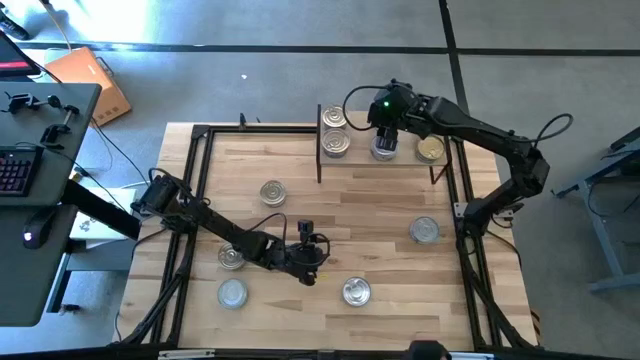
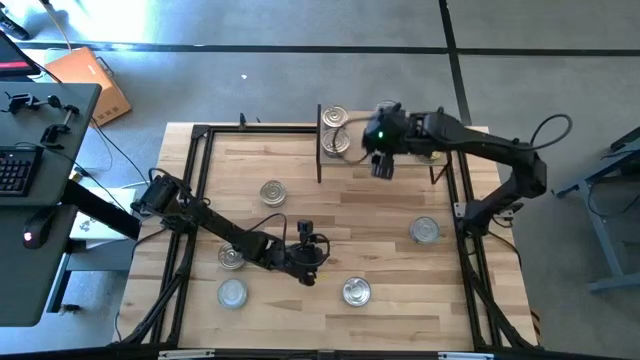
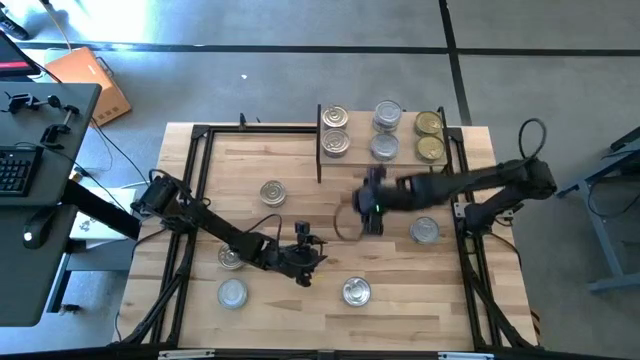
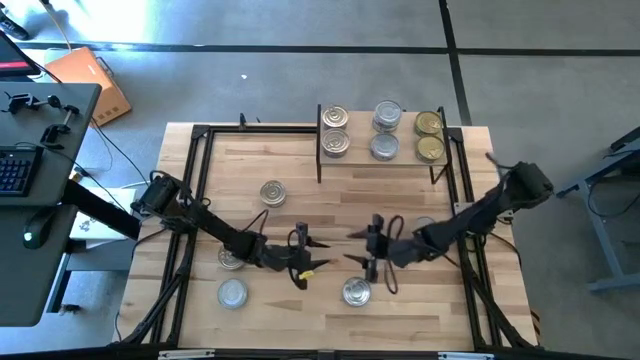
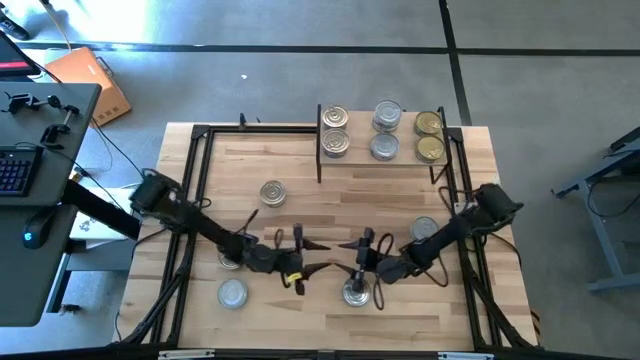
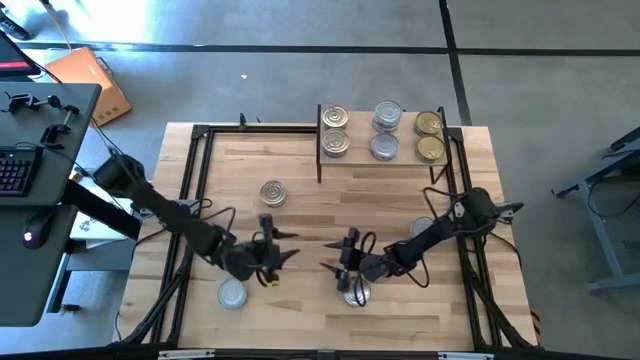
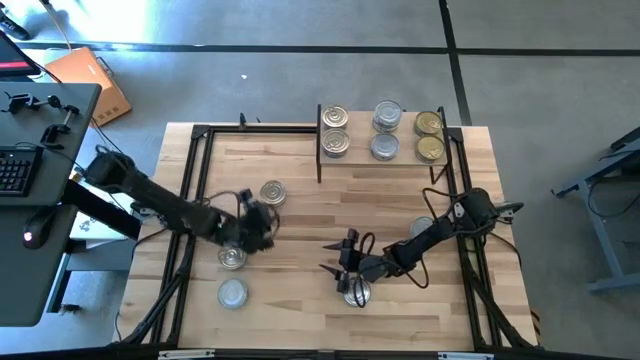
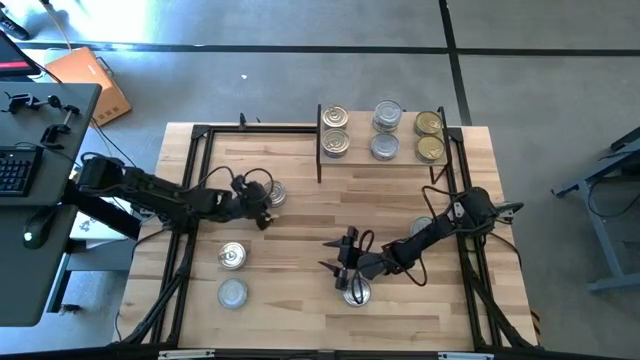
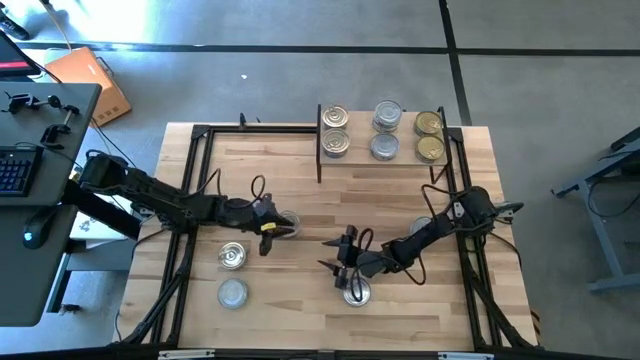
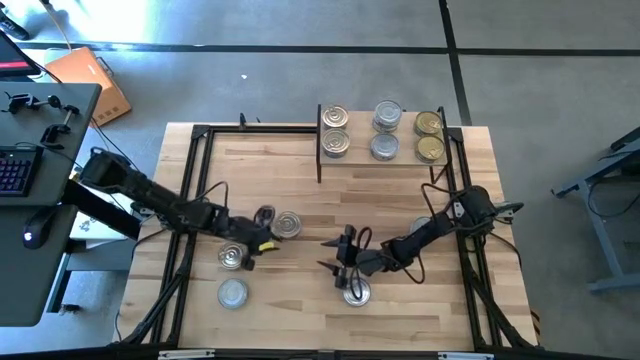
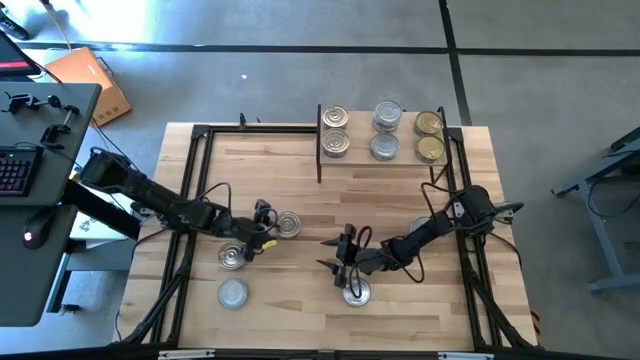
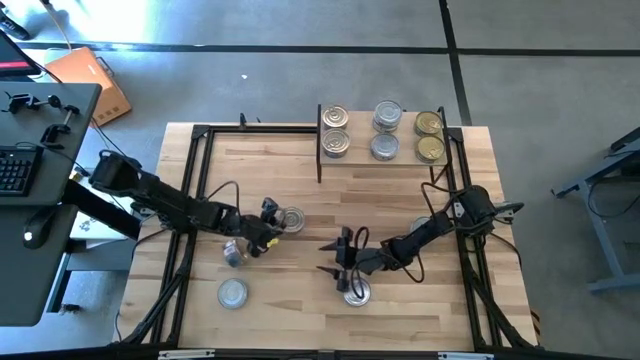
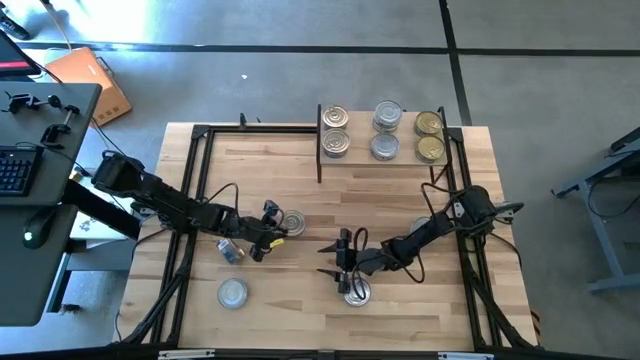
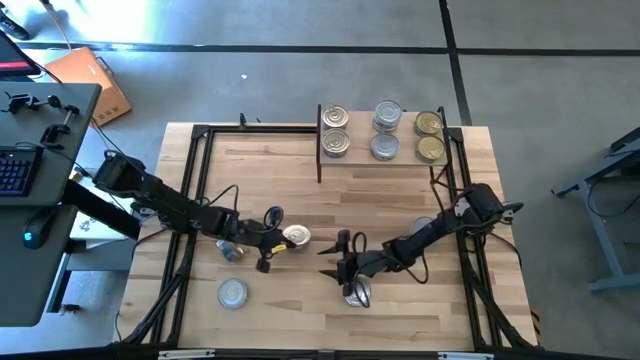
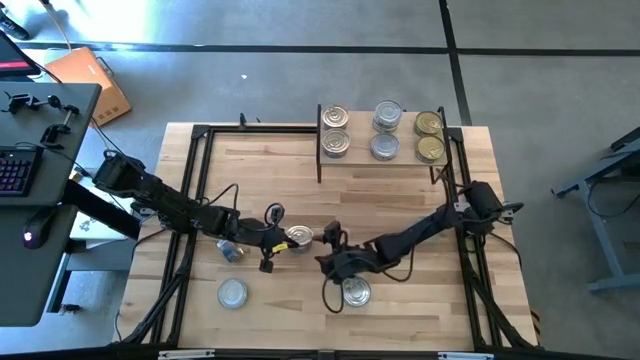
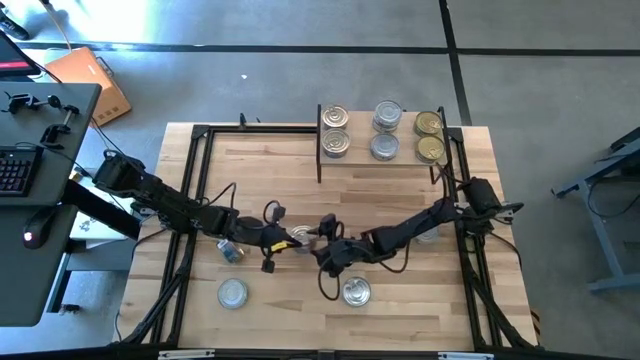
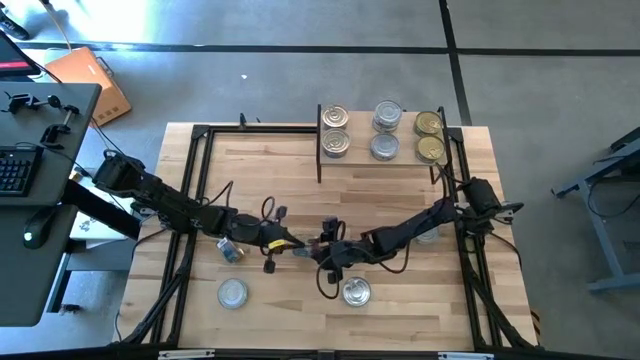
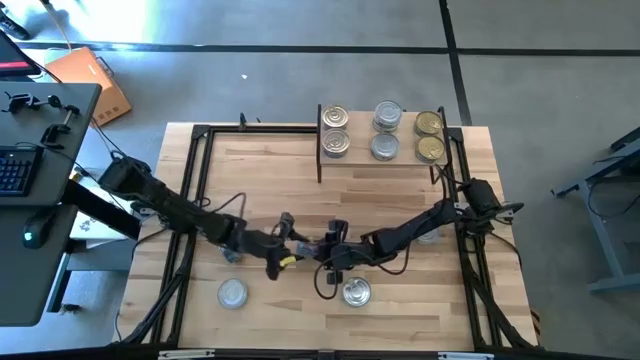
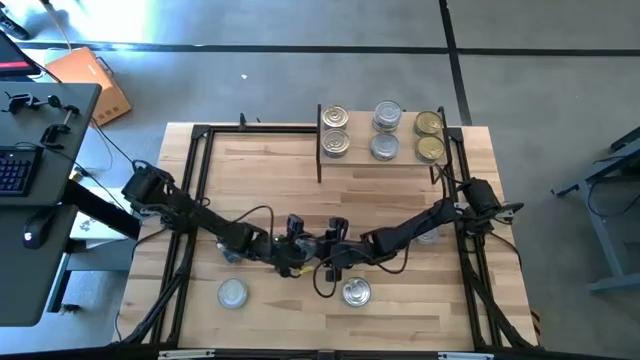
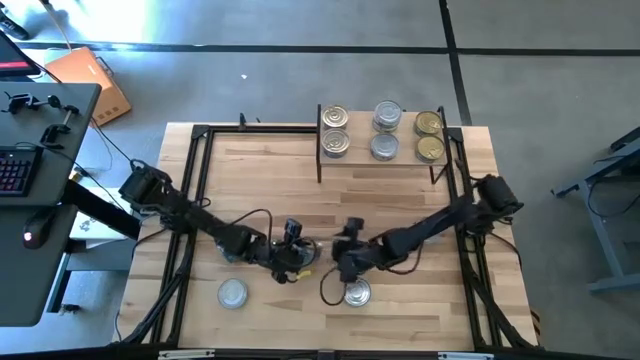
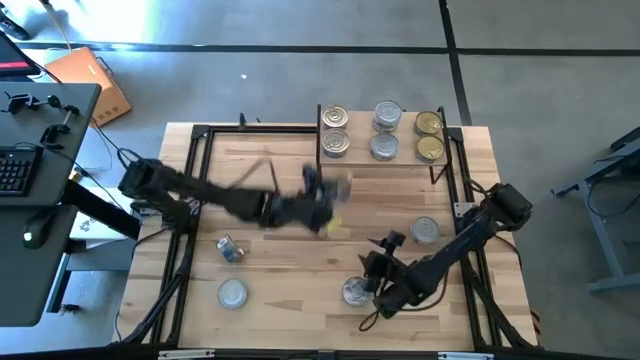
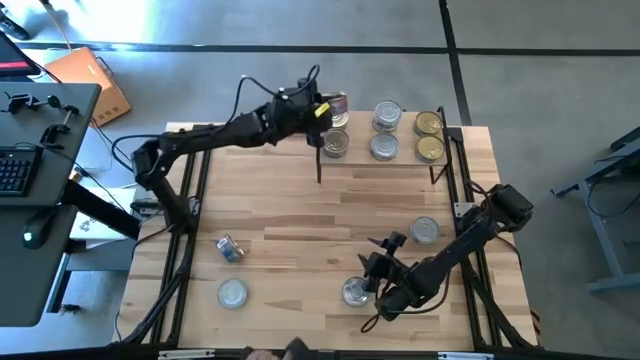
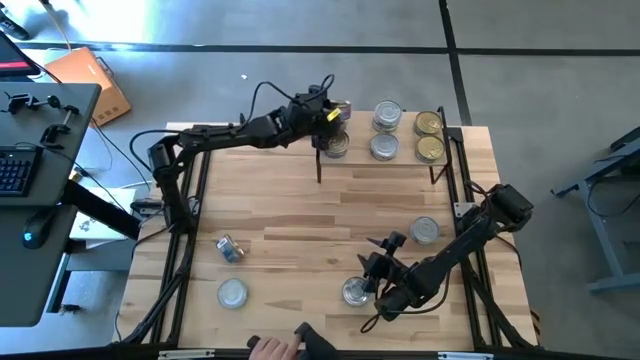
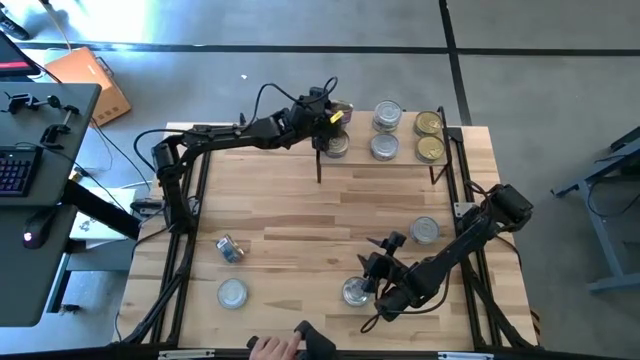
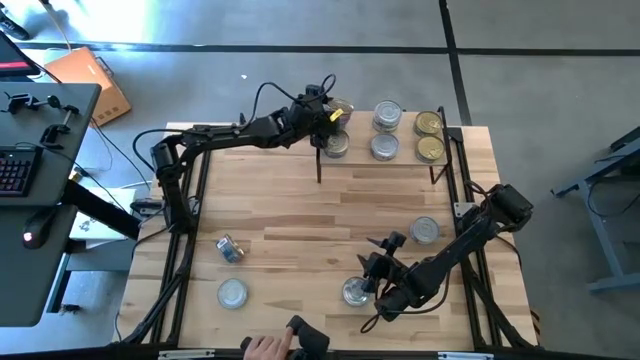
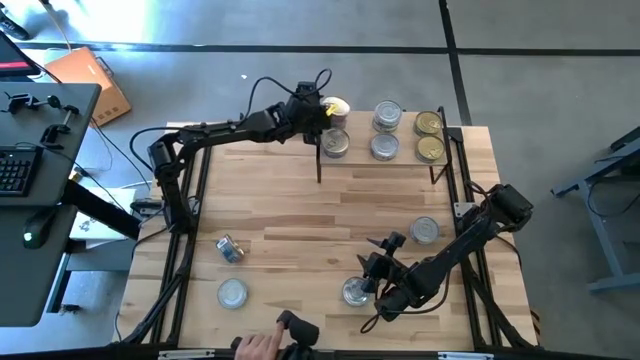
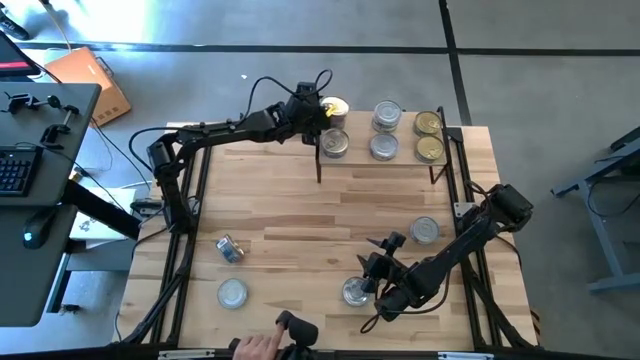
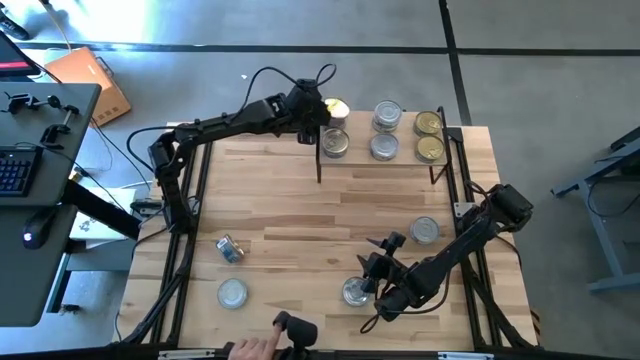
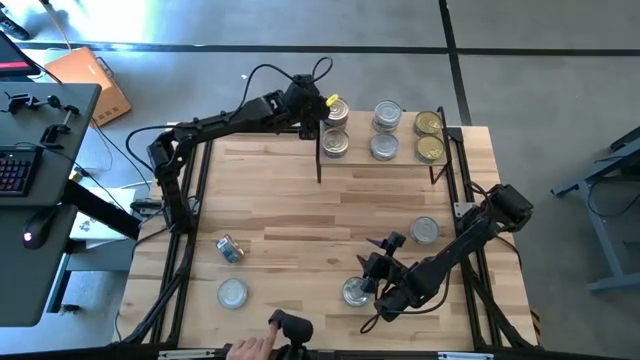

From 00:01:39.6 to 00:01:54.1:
Task: Stack canned seafood by type on shelf
Stack the blue tuna can on top of the other blue tuna can on the shelf

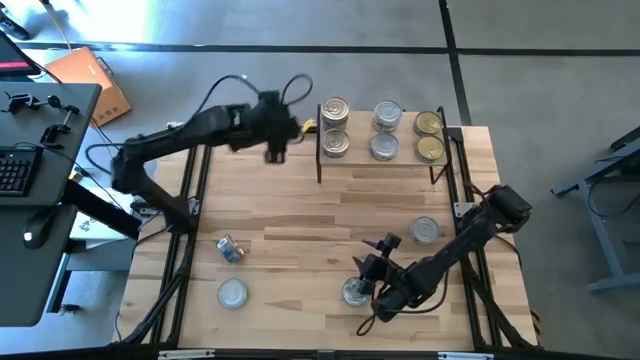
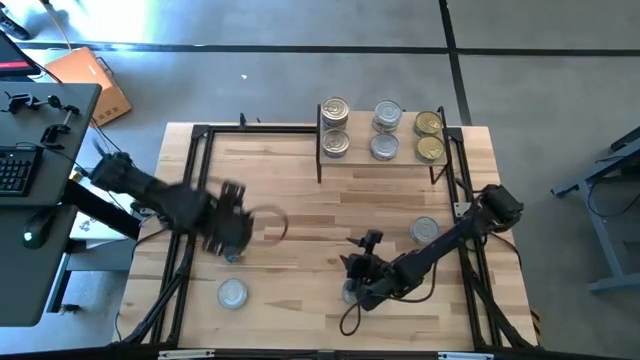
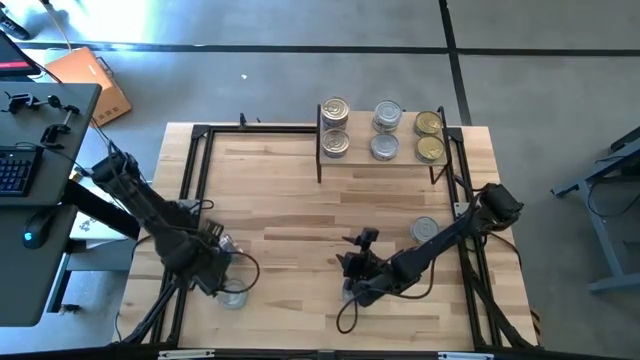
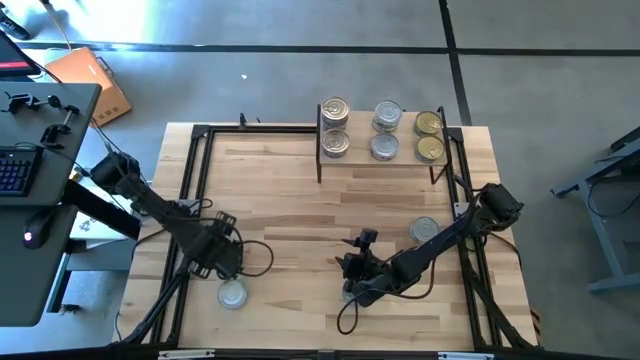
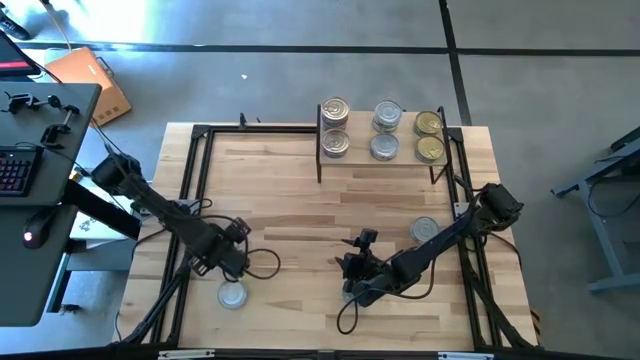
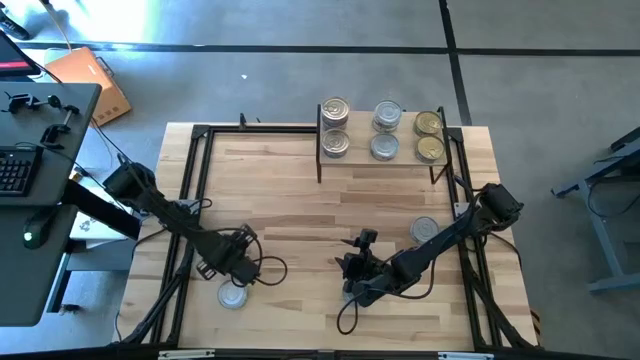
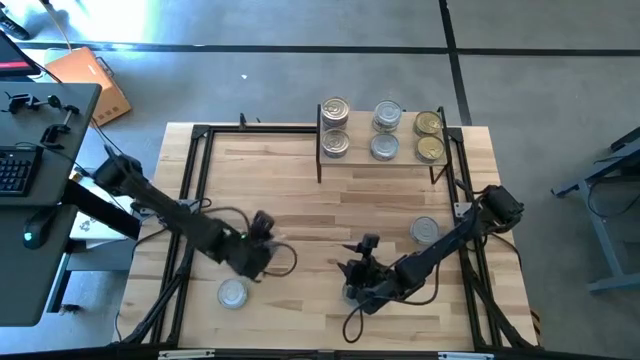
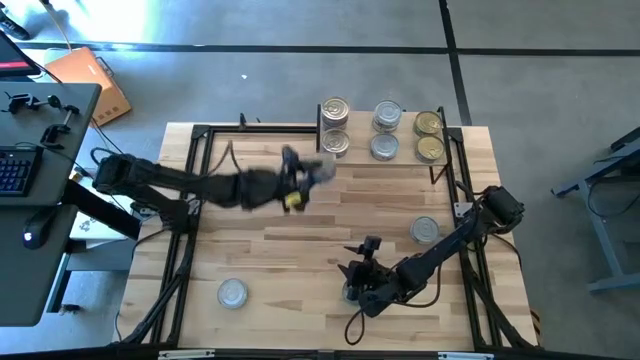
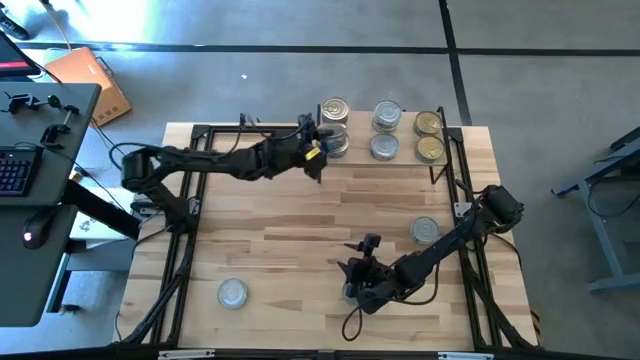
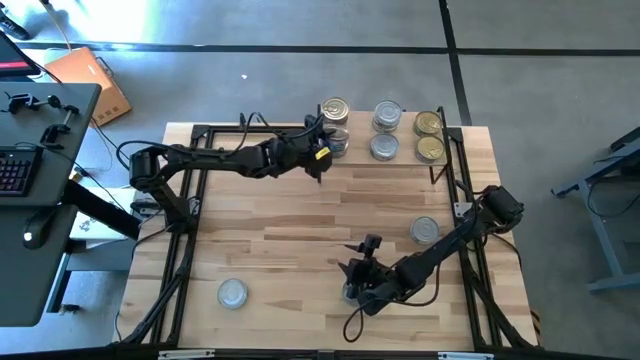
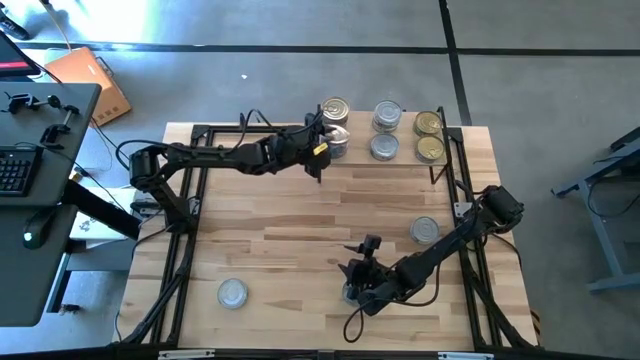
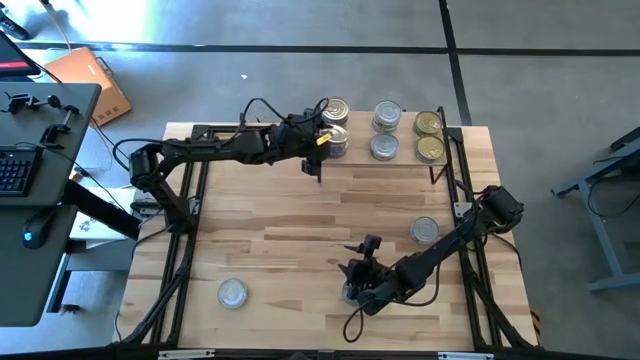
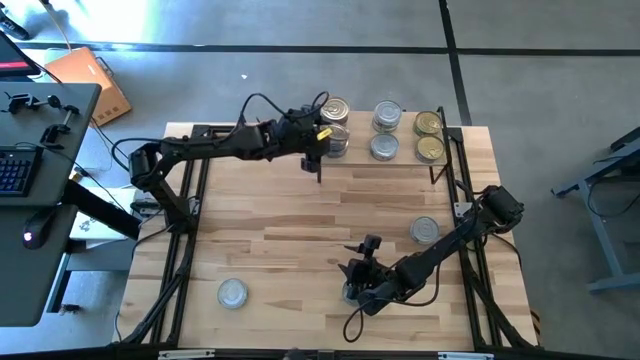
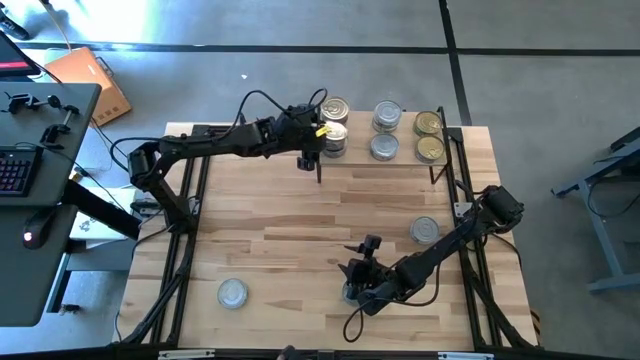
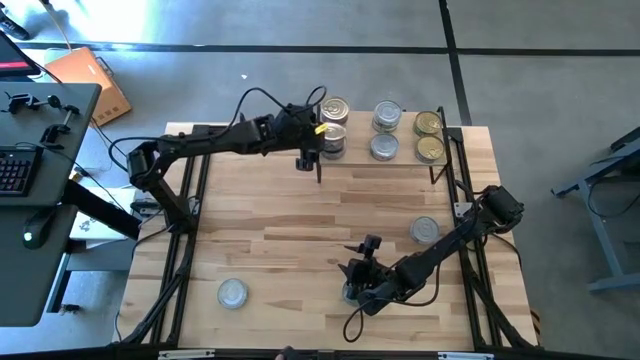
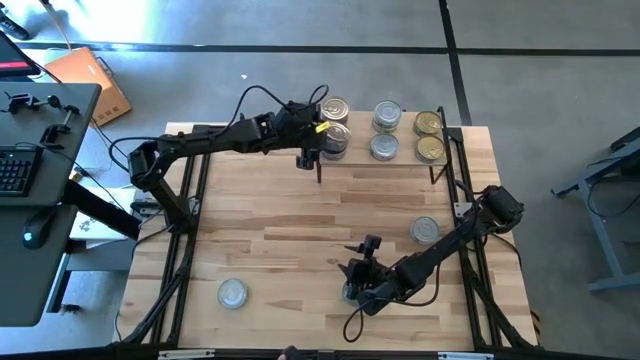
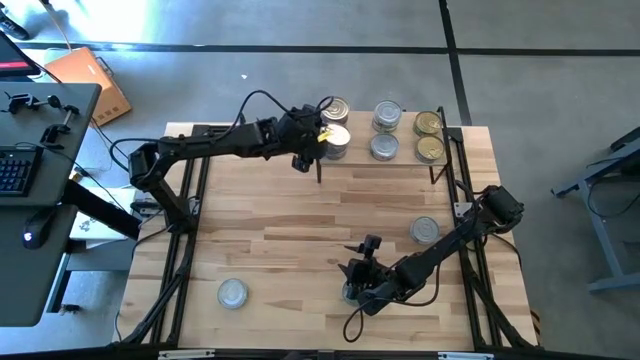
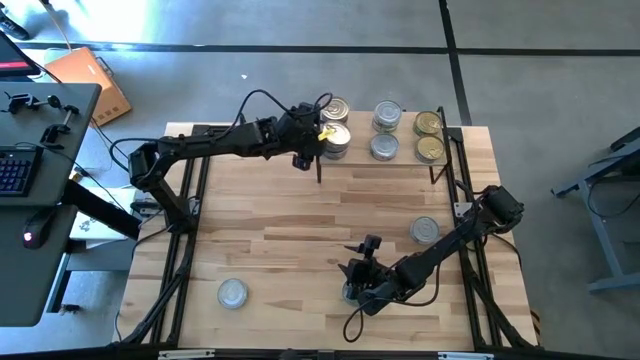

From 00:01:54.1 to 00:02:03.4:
Stack the blue tuna can on top of the other blue tuna can on the shelf
